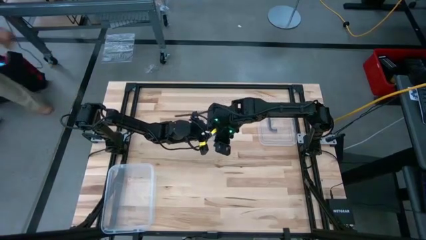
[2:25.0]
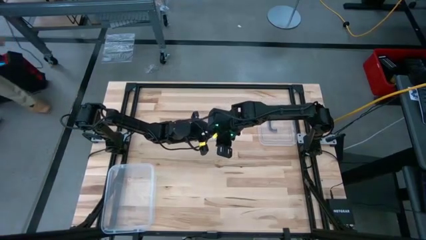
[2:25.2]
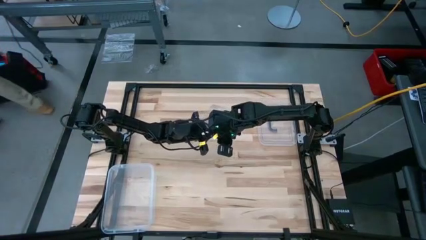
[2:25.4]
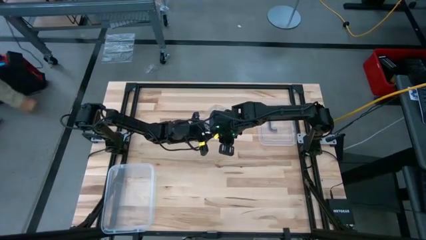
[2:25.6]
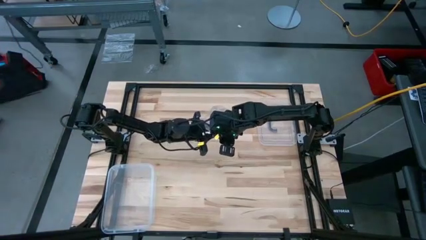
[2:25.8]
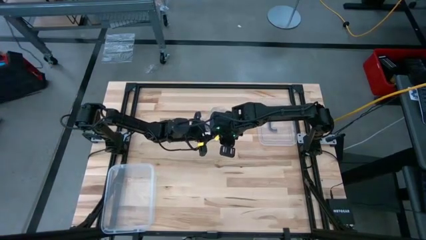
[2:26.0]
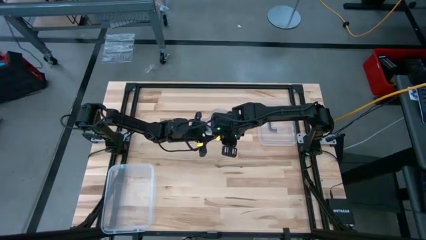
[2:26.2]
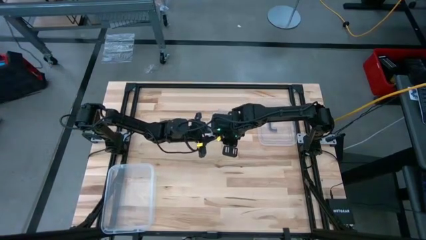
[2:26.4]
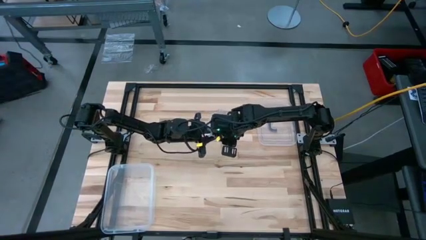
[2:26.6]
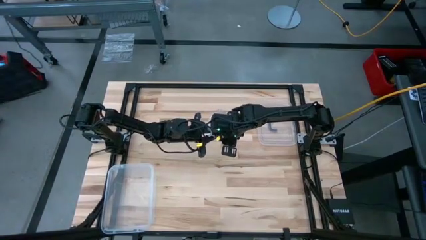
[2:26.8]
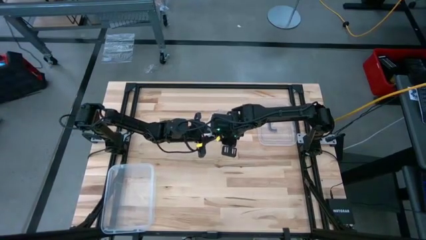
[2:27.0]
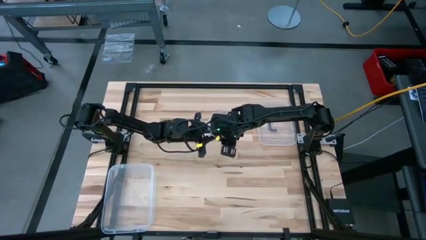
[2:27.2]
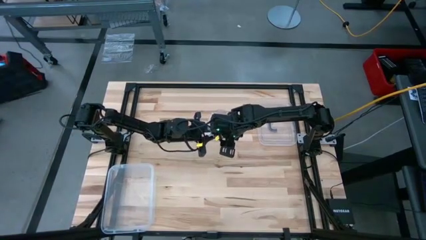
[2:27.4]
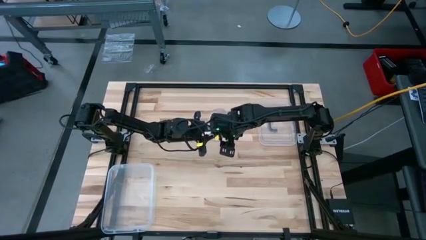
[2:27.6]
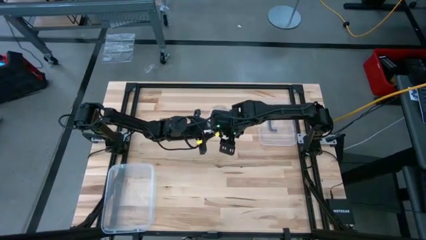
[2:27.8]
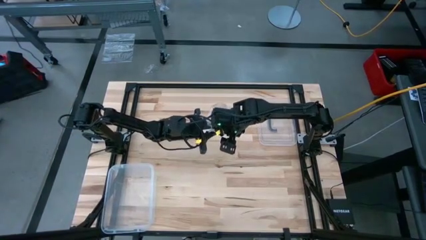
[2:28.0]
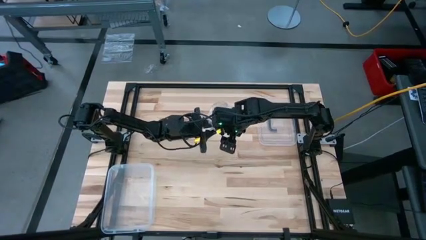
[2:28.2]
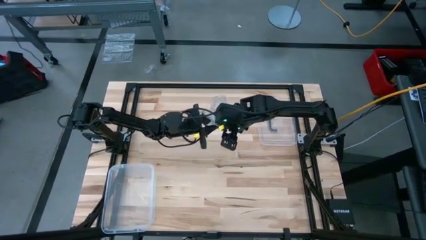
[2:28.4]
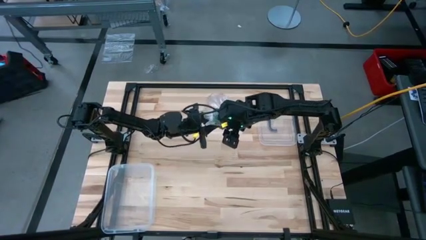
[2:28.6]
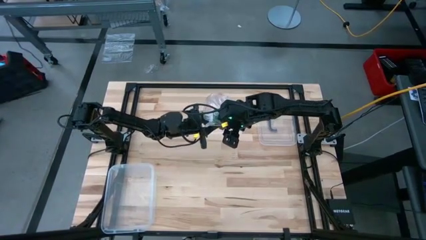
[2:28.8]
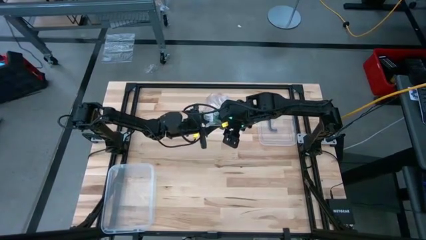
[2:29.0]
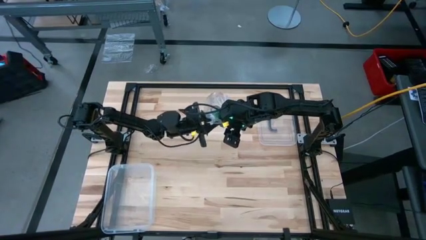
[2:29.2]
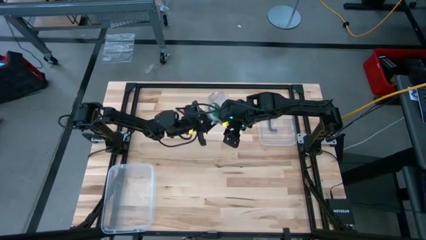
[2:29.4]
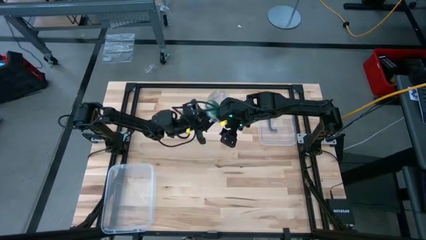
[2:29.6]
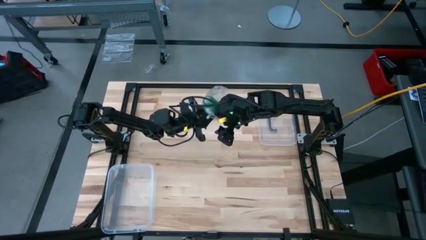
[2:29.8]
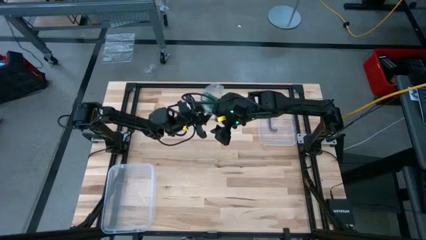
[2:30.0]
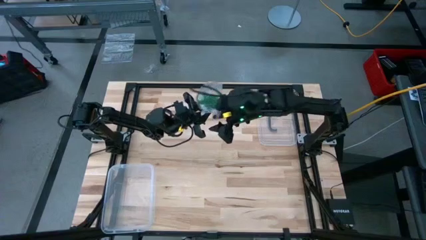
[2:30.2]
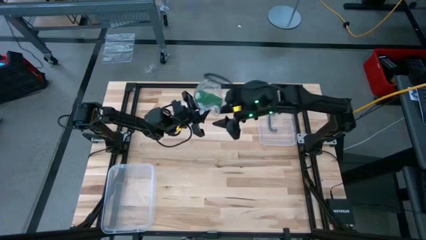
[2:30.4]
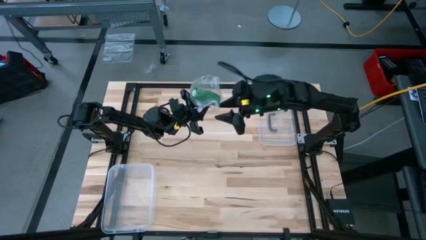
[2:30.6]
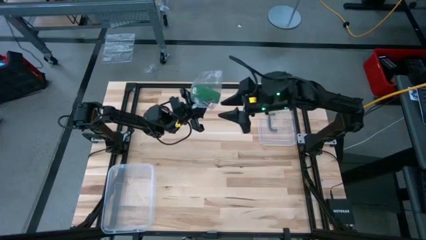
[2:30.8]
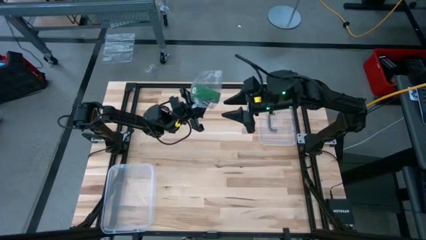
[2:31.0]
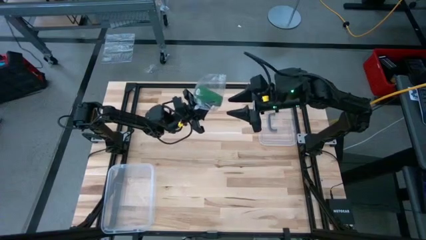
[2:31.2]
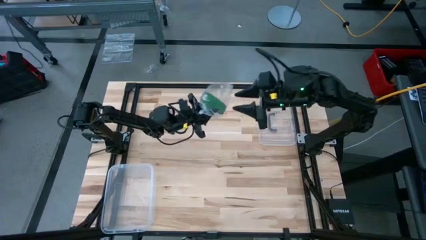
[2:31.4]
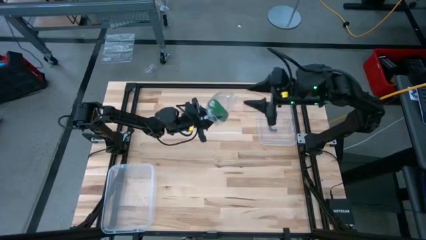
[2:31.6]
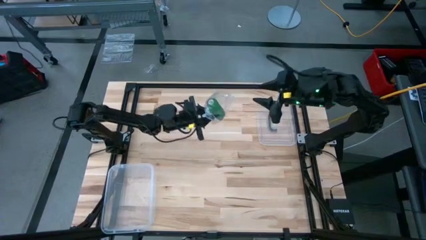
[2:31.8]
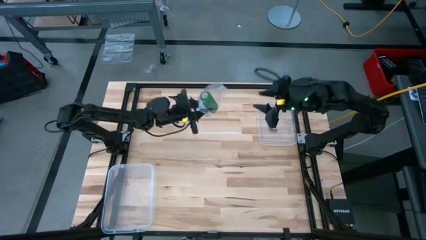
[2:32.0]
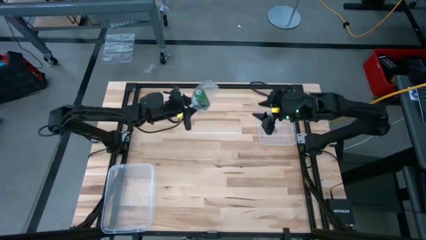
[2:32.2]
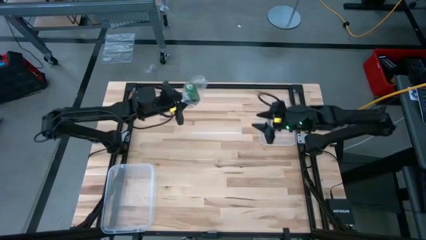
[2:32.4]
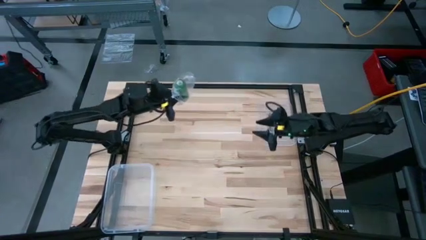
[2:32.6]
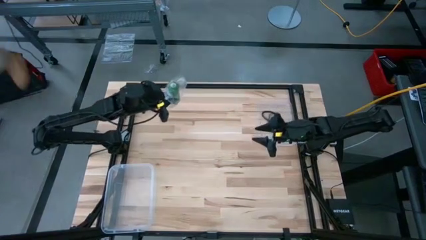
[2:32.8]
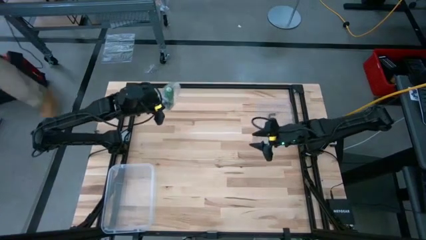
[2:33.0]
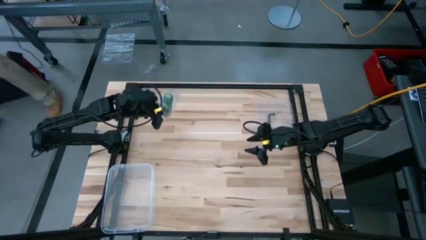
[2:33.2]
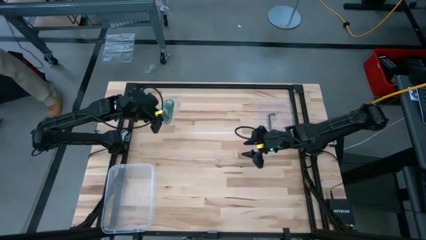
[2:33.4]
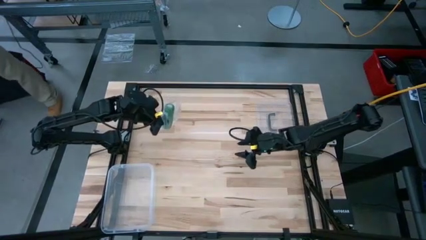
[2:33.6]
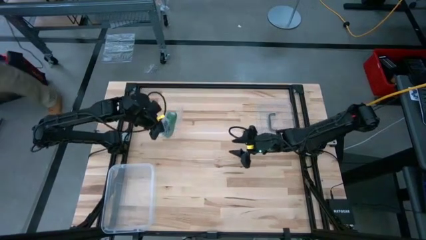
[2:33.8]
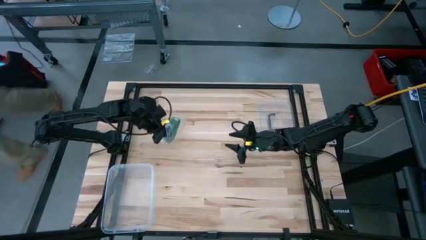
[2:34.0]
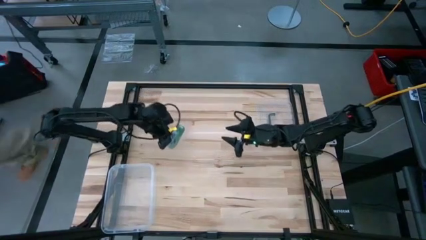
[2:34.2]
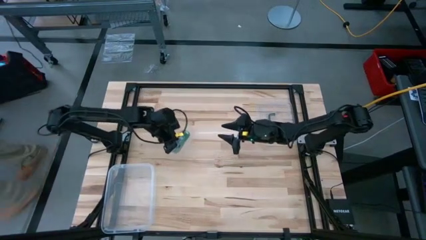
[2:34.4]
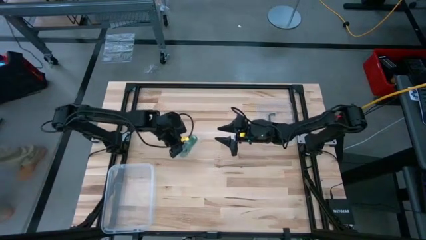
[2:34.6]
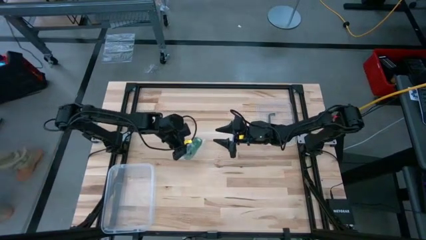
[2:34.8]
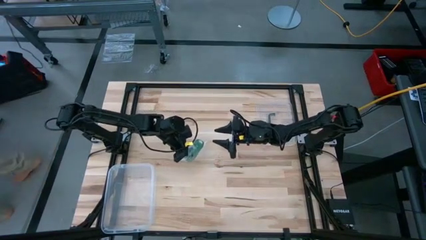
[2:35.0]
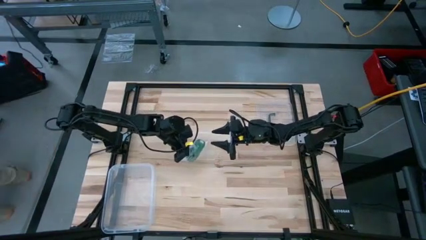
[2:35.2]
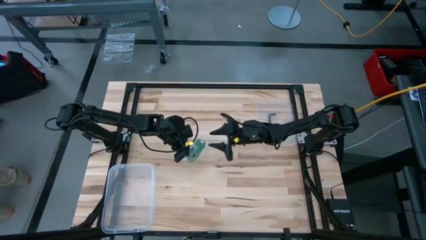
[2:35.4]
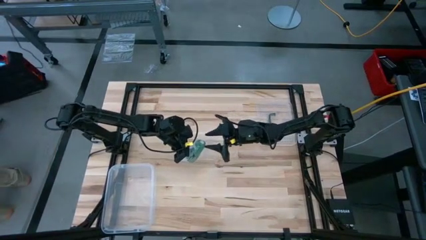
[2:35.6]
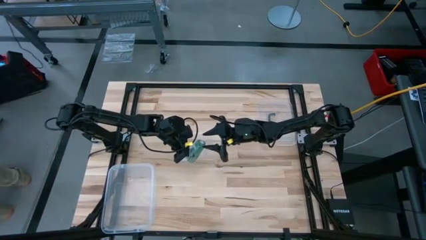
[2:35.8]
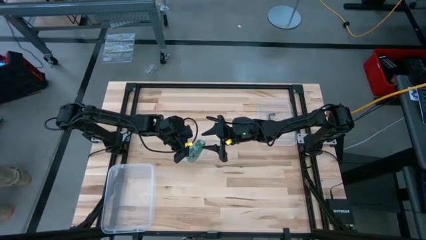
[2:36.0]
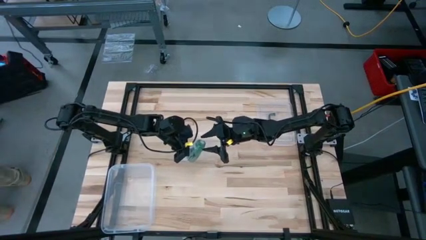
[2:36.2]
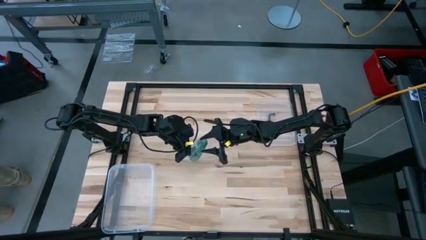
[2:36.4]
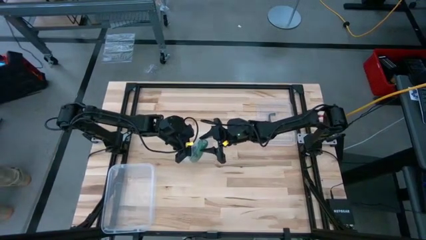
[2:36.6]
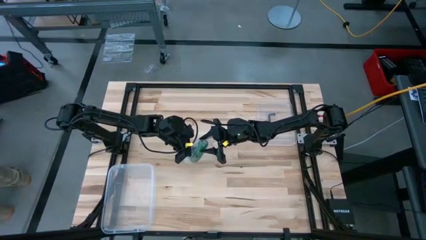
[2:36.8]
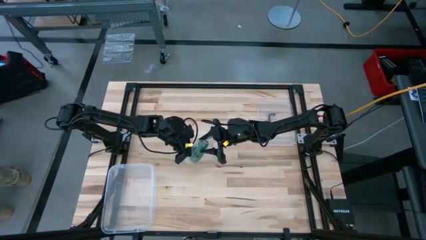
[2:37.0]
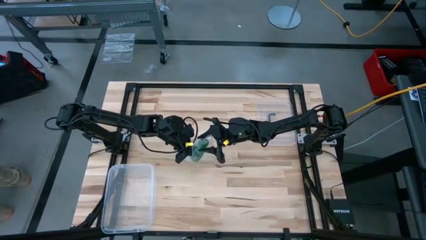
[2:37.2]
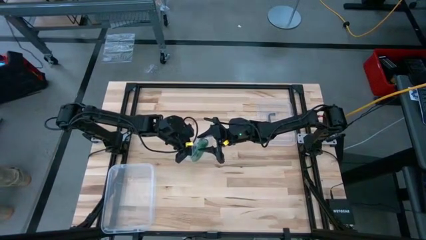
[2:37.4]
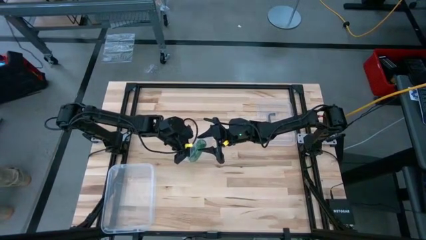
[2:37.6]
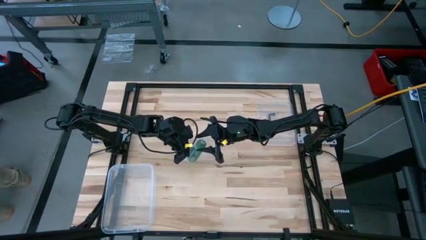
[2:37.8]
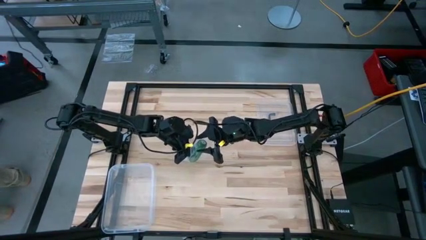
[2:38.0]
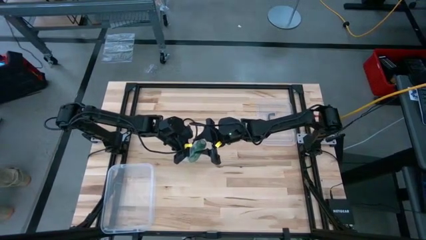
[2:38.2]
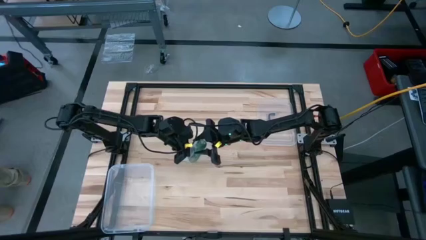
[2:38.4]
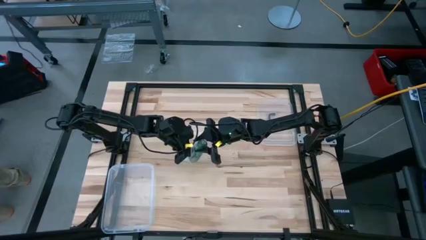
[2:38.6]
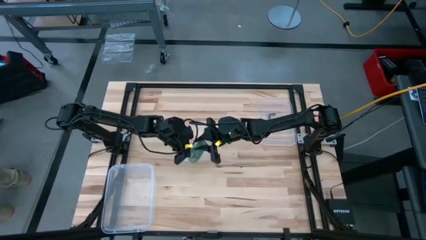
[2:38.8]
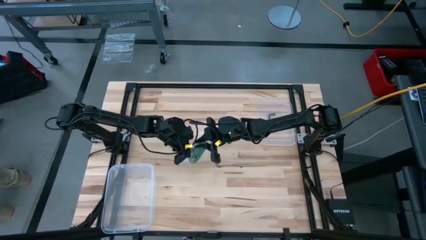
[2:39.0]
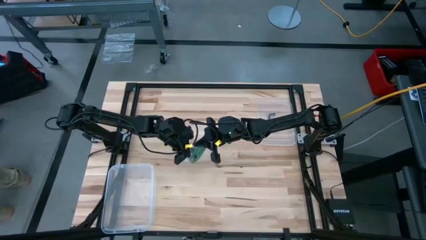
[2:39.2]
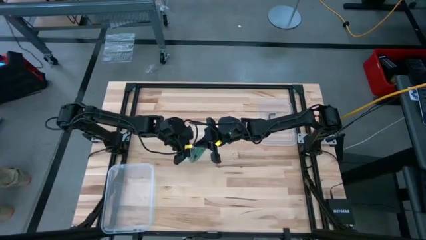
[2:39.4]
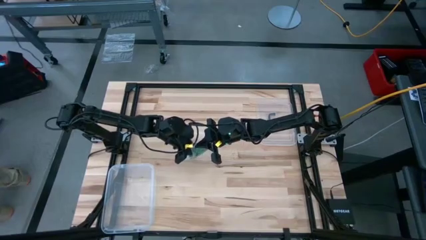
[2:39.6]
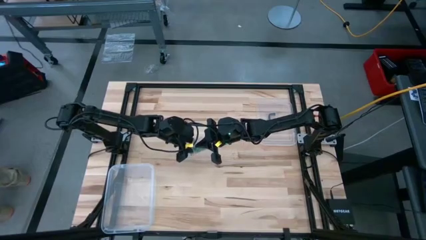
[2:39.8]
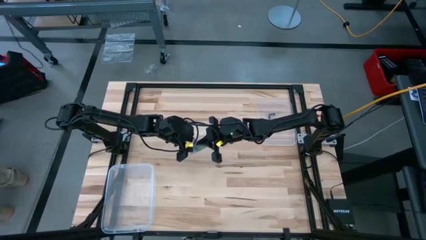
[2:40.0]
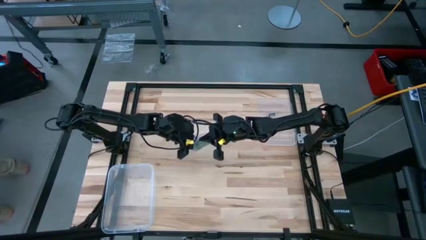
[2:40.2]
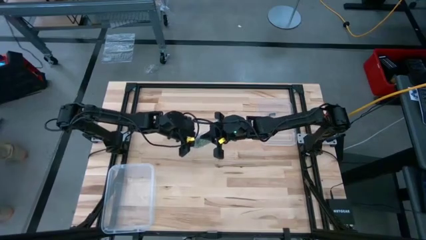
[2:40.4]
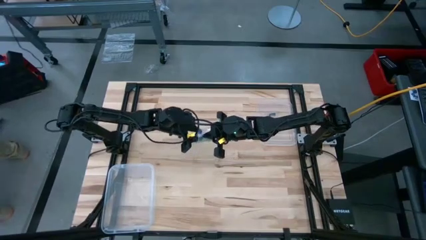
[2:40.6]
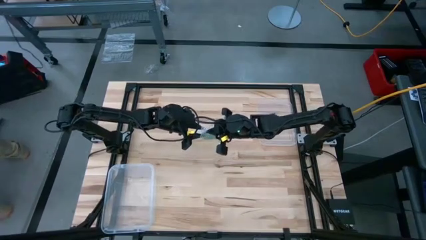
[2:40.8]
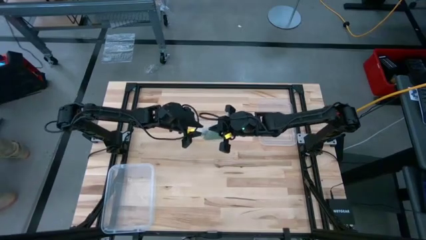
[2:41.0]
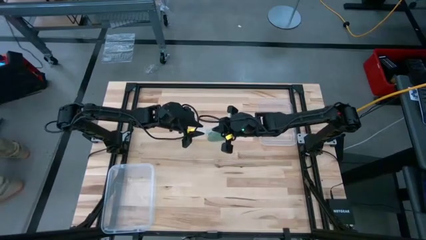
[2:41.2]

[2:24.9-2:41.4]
Task: Roll bandage
Put the bandage into the zip bag
